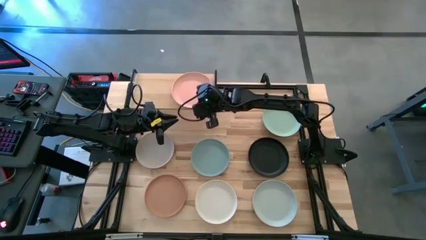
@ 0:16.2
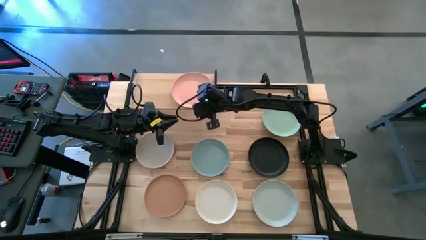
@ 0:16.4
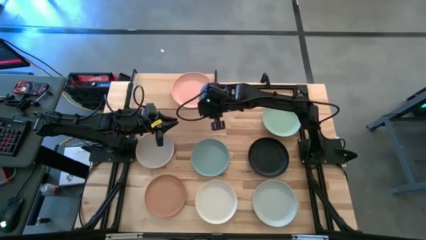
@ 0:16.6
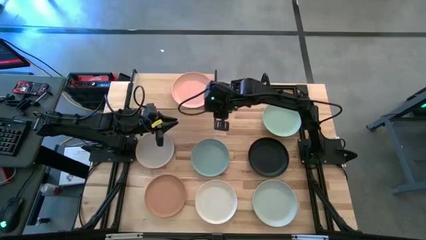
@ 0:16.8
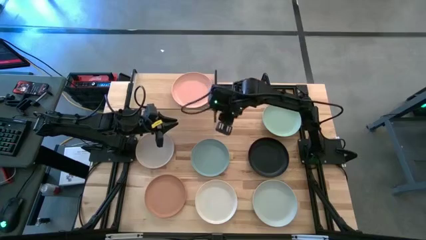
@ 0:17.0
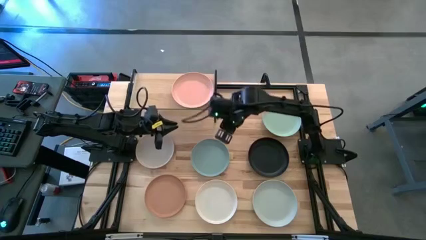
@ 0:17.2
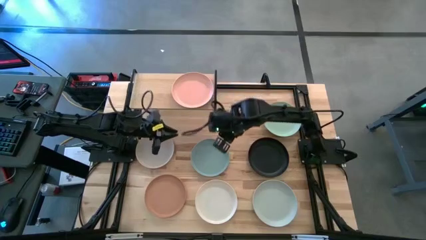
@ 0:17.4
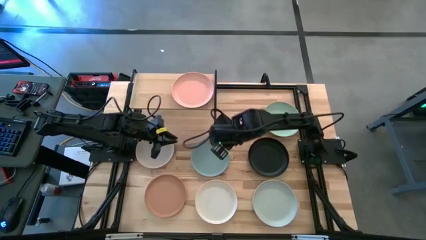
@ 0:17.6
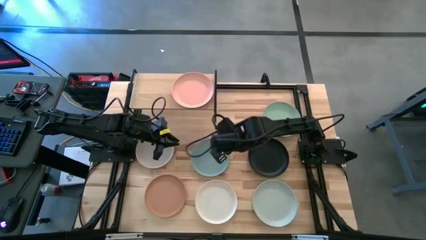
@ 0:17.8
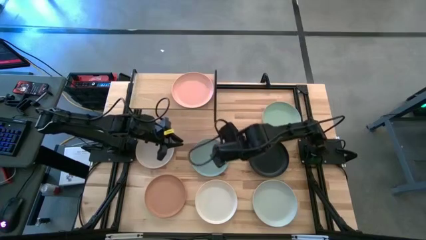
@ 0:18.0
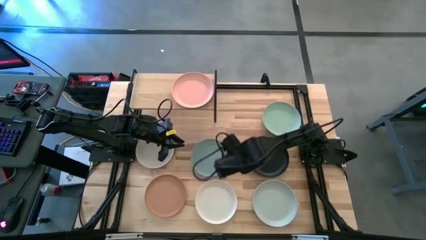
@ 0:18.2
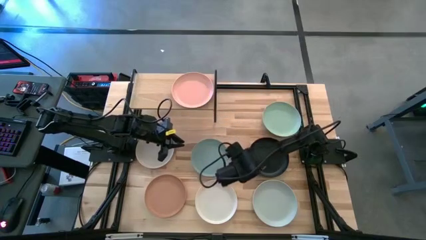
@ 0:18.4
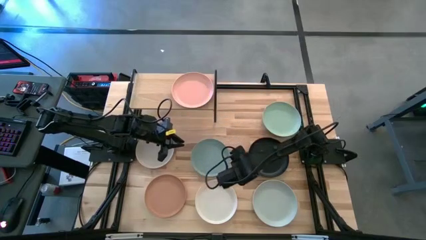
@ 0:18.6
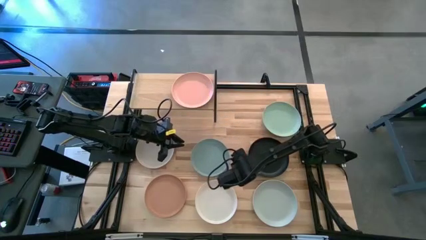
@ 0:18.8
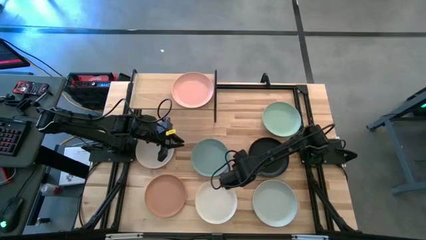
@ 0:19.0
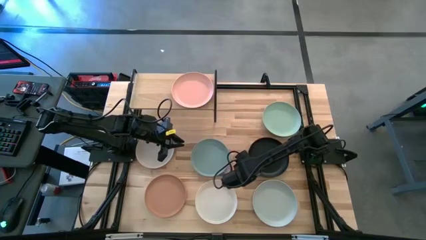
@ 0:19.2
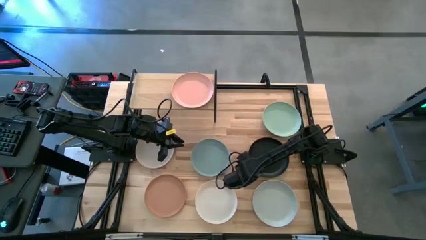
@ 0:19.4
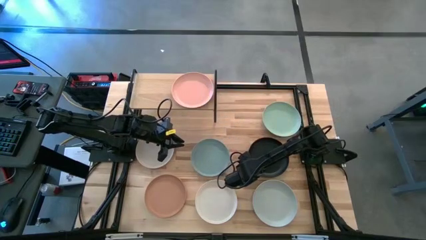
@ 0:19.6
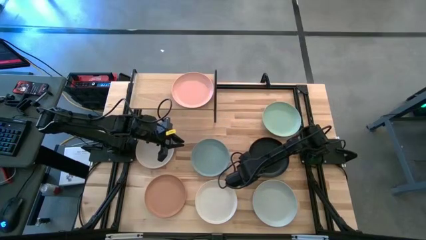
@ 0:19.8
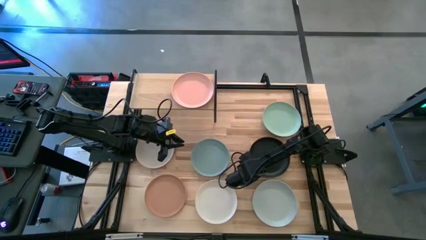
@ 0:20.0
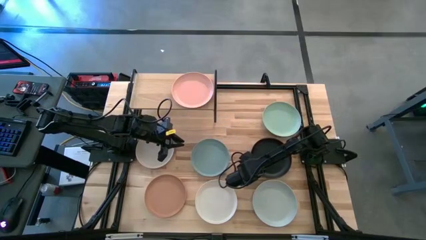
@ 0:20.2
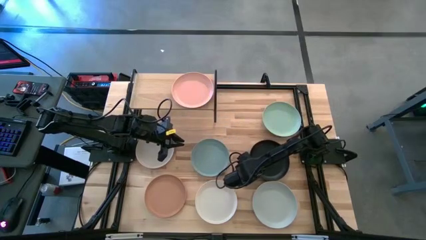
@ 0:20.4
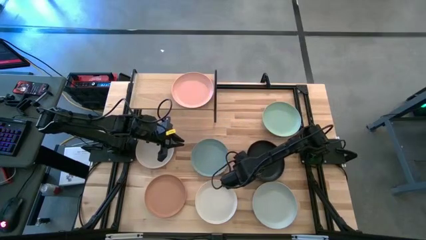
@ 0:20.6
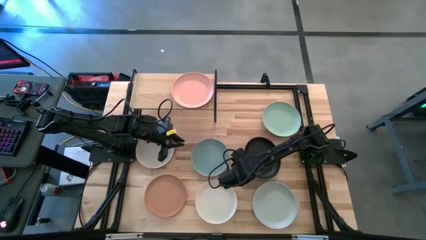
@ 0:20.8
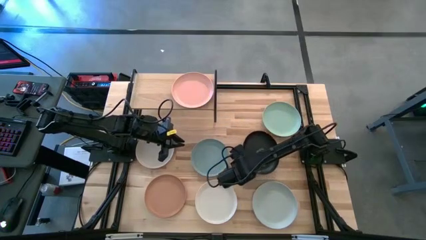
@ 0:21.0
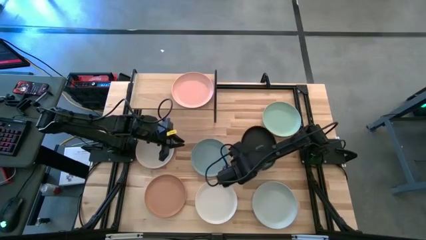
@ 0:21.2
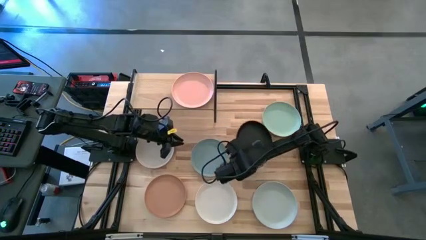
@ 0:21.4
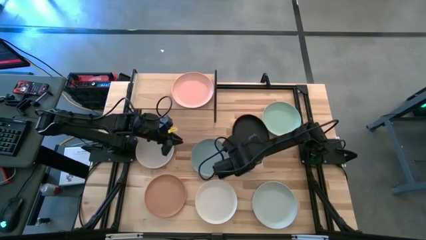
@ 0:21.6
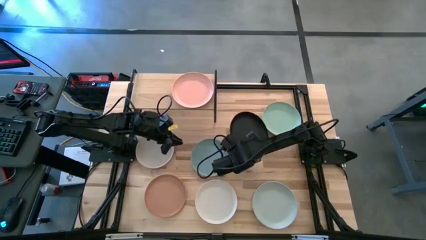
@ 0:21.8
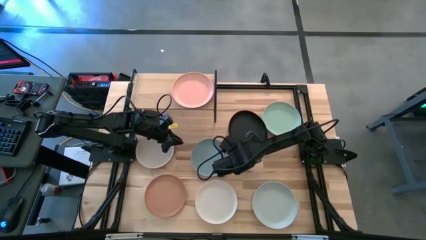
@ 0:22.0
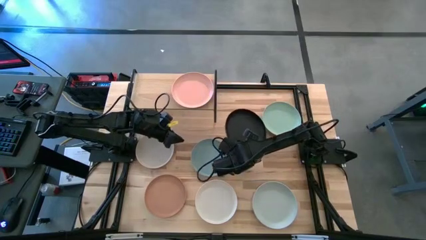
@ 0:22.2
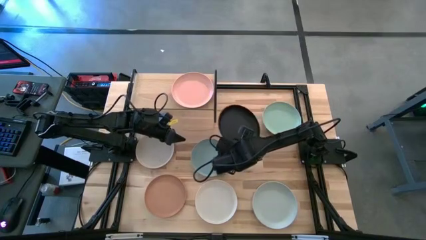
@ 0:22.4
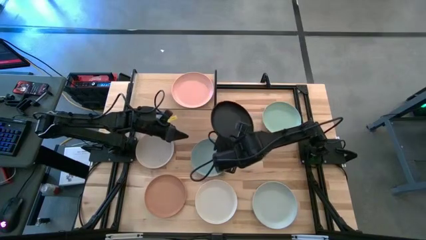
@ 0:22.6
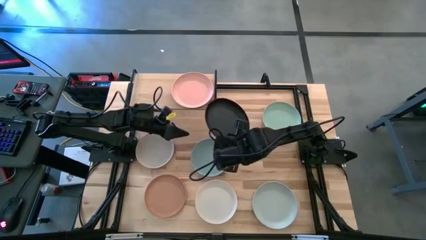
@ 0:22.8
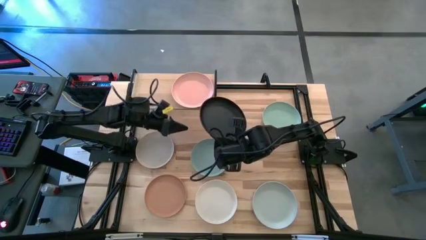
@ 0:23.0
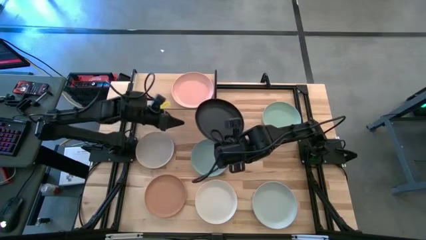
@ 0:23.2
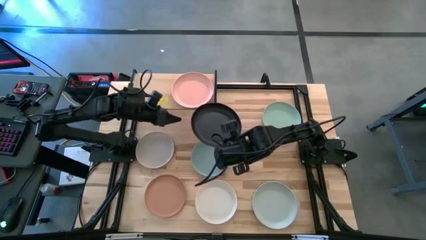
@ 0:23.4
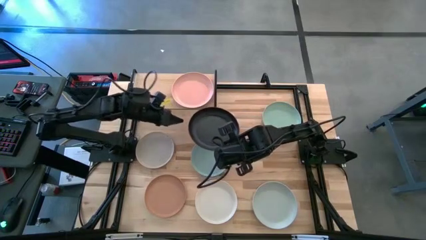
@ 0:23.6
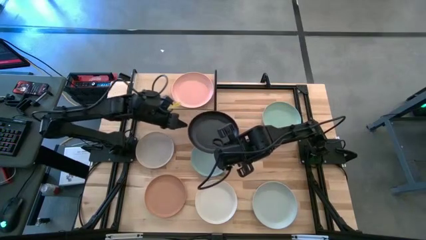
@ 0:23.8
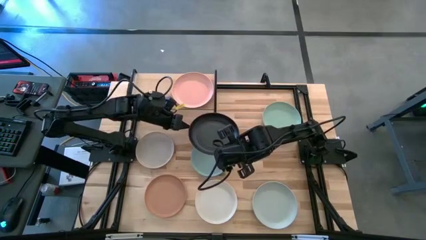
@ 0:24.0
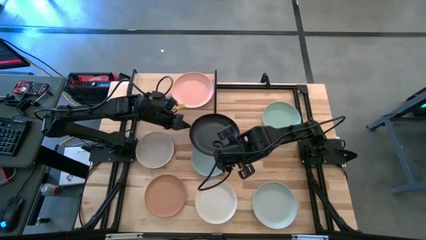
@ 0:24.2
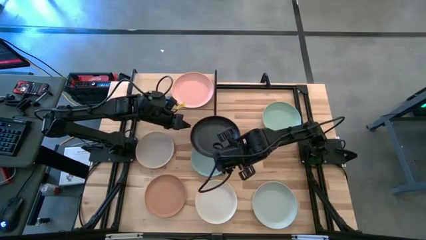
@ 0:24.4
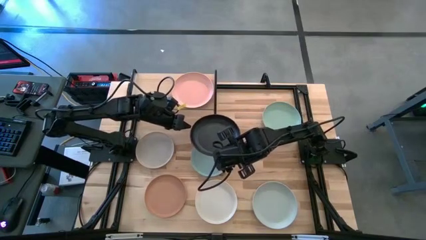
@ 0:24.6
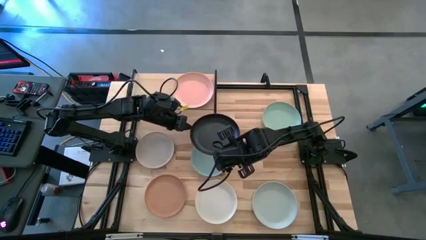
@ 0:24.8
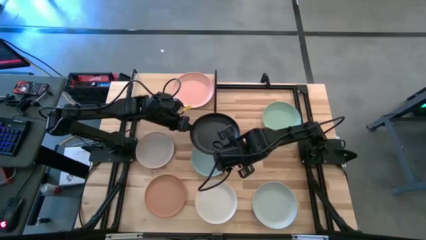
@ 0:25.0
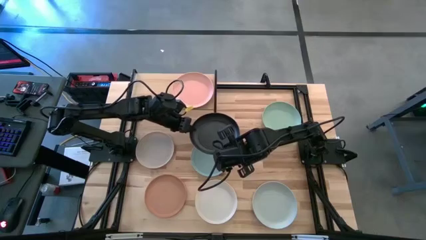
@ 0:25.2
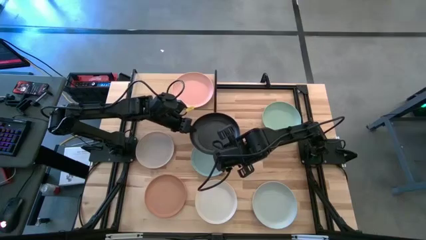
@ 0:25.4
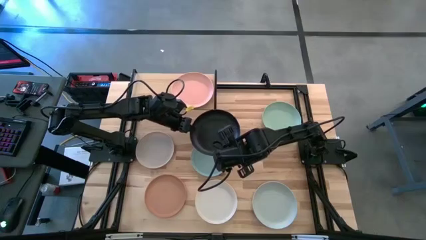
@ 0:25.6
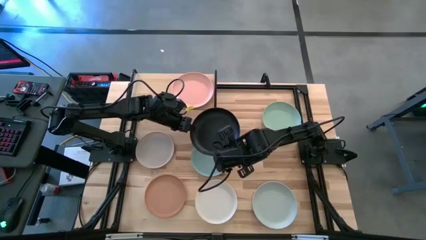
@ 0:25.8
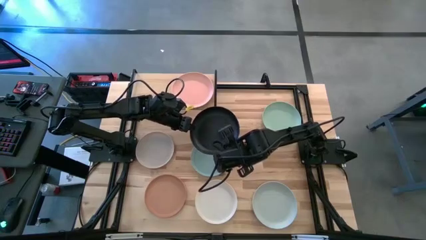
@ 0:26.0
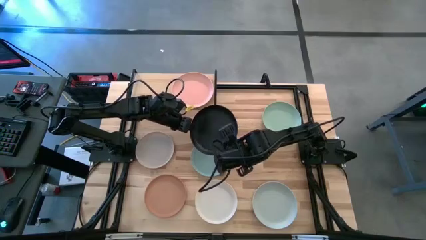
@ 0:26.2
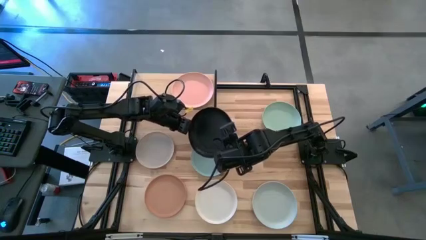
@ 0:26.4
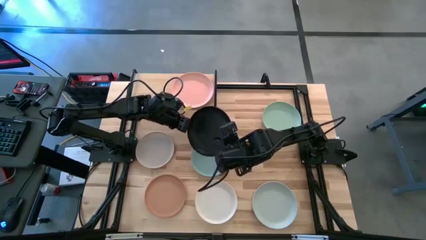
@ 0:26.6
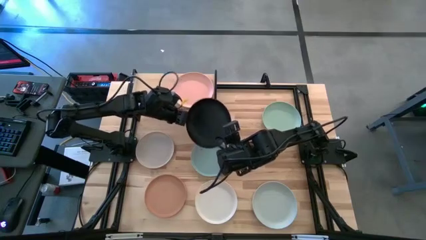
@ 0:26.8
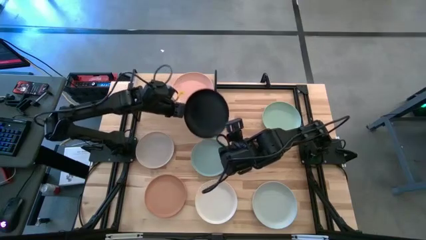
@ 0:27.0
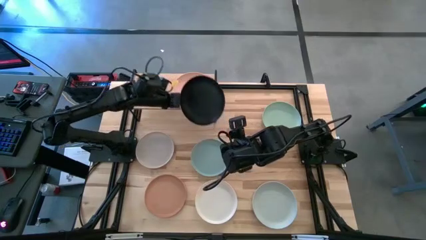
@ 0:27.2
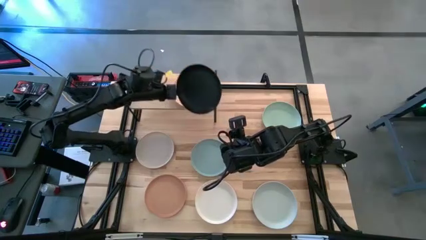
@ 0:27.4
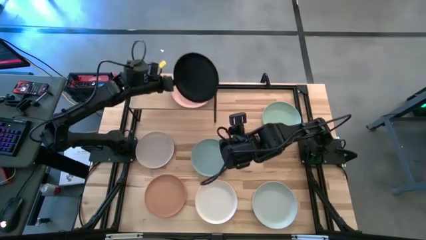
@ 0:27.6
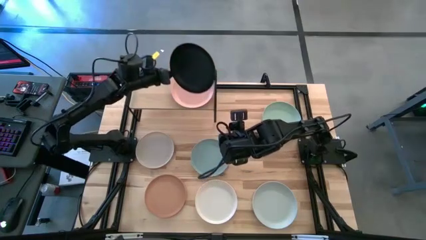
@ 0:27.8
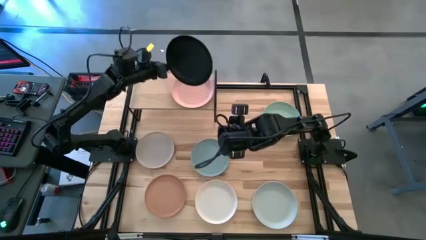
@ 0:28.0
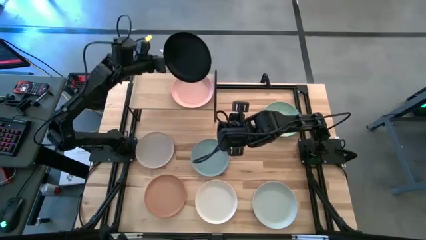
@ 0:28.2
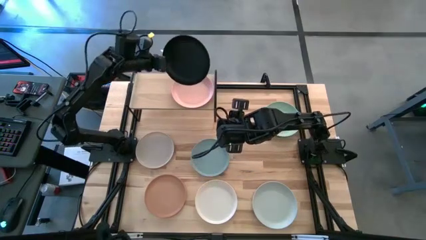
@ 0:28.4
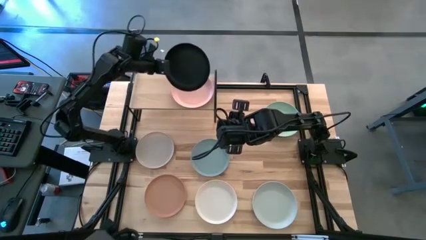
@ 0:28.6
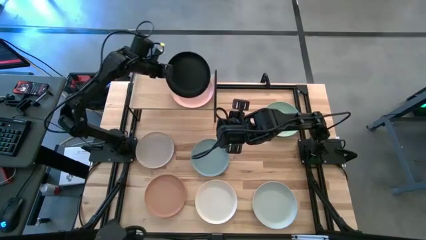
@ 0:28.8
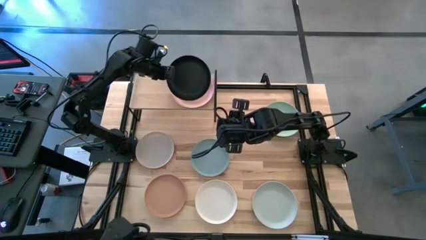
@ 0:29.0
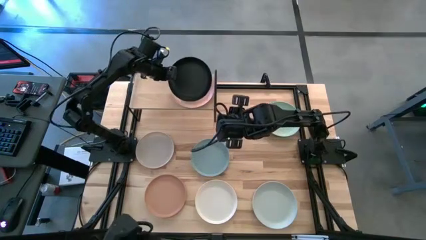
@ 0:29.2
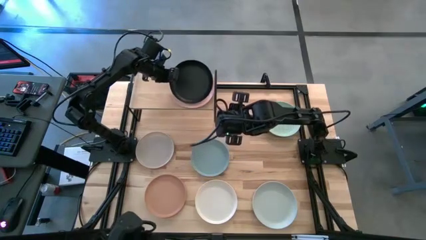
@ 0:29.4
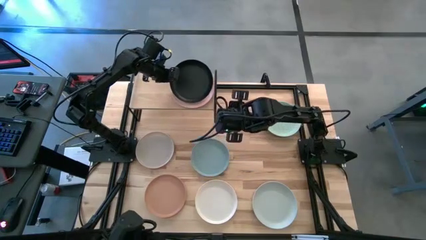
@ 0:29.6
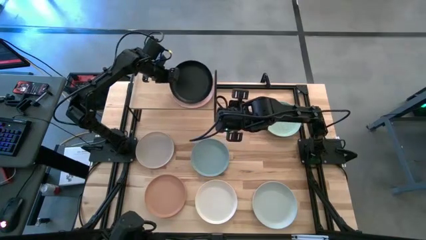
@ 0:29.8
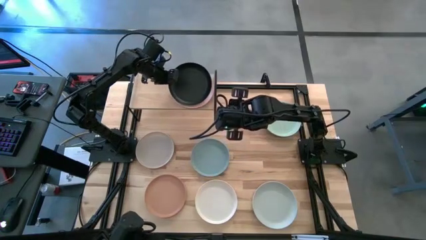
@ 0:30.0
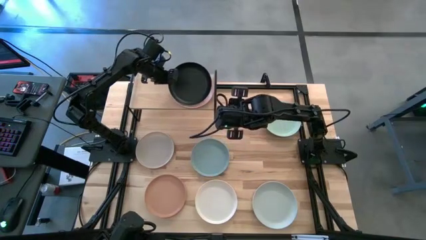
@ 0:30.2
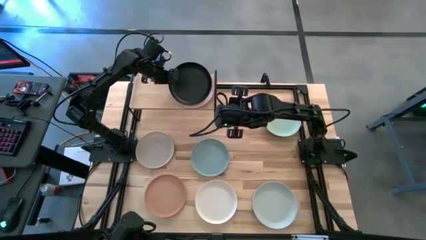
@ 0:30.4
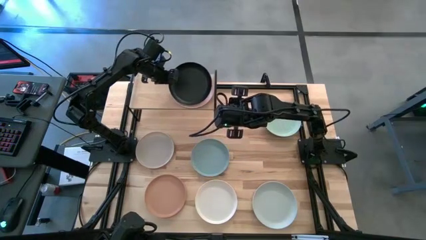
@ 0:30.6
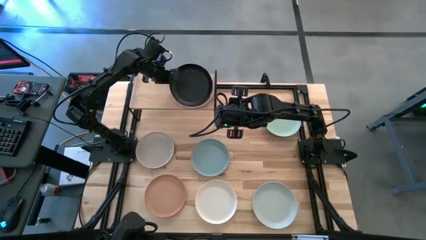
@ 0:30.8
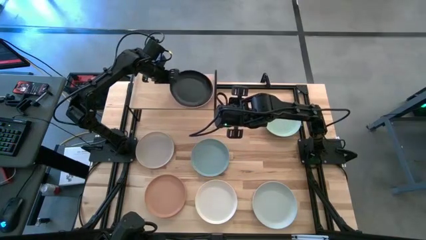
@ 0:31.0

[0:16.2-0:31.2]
Task: Place and stack plates onto a shelf
Stack the black plate into the light orange plate on the shelf
